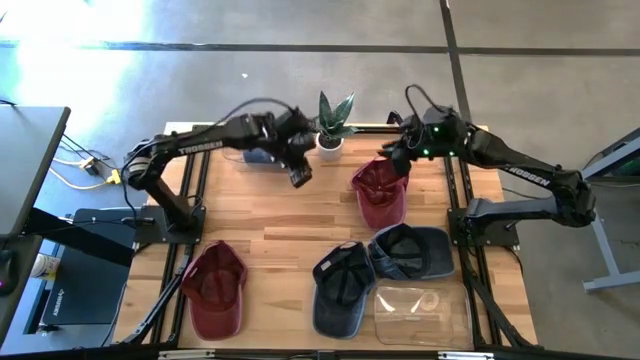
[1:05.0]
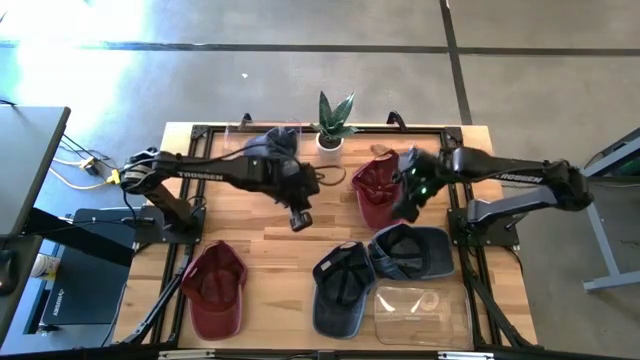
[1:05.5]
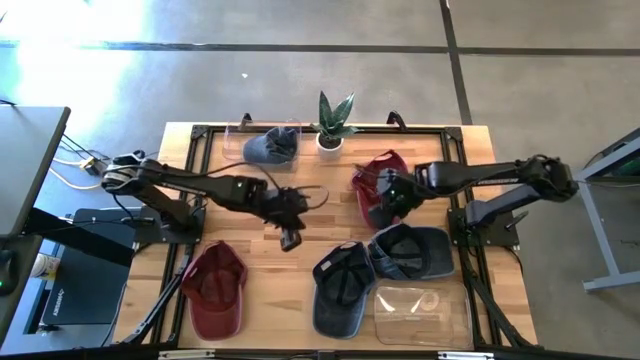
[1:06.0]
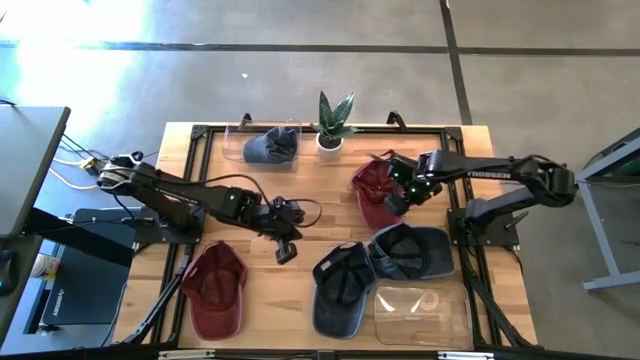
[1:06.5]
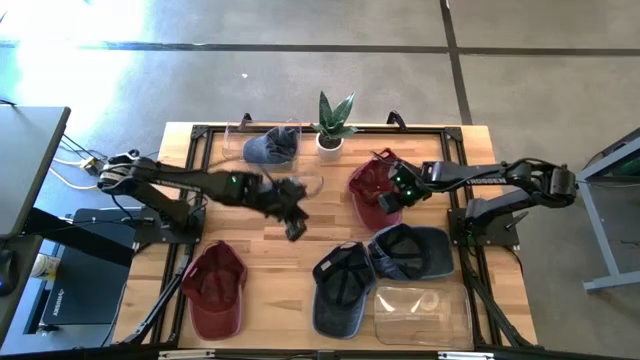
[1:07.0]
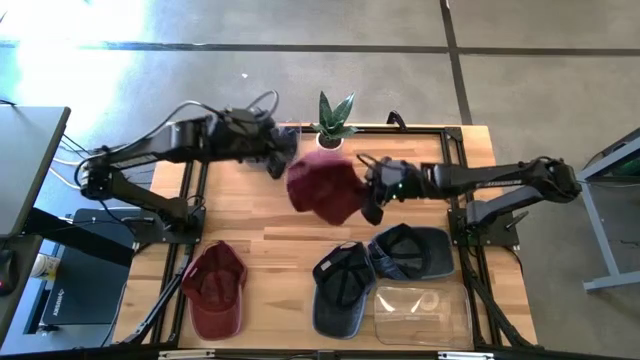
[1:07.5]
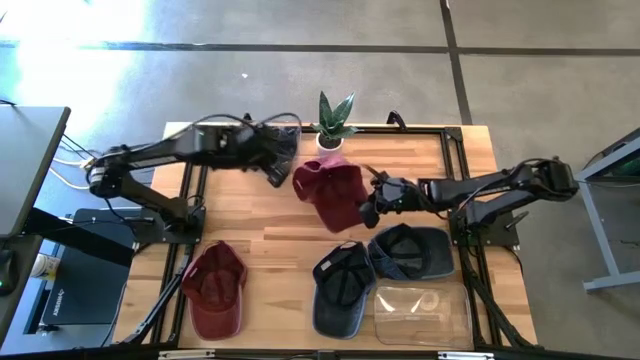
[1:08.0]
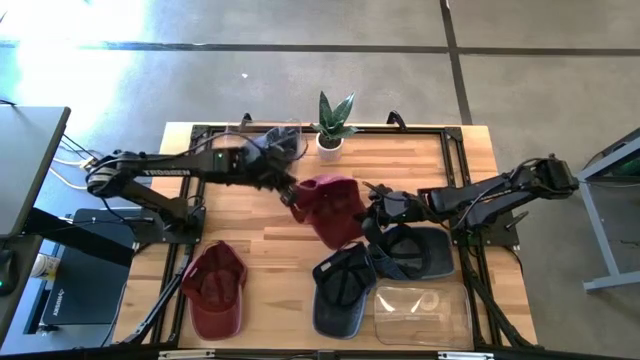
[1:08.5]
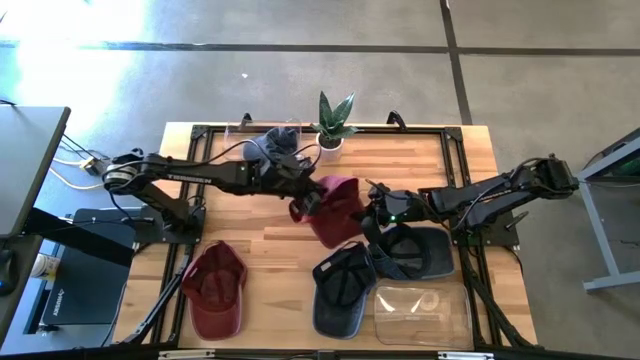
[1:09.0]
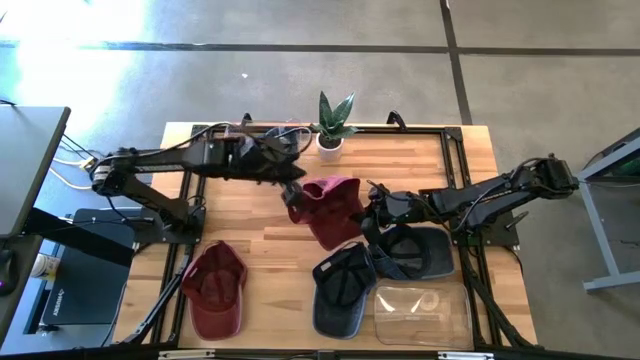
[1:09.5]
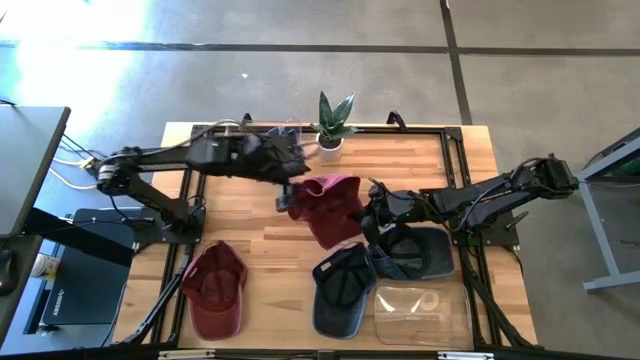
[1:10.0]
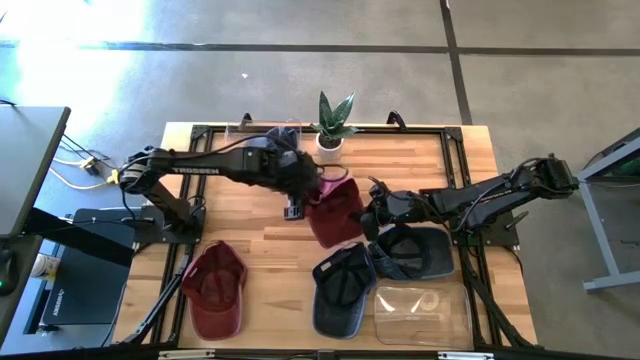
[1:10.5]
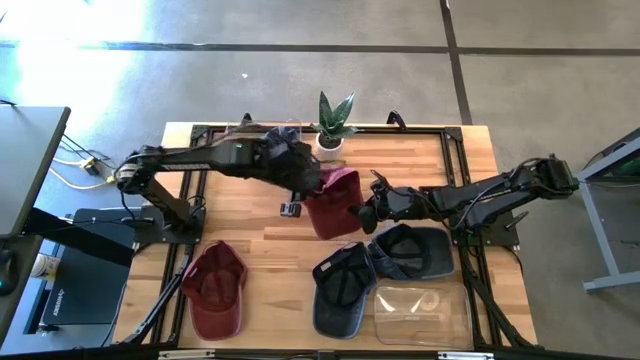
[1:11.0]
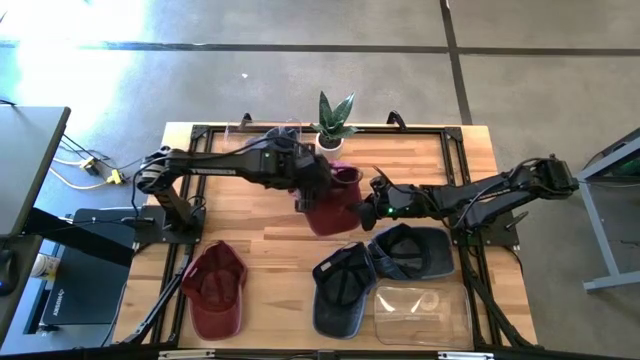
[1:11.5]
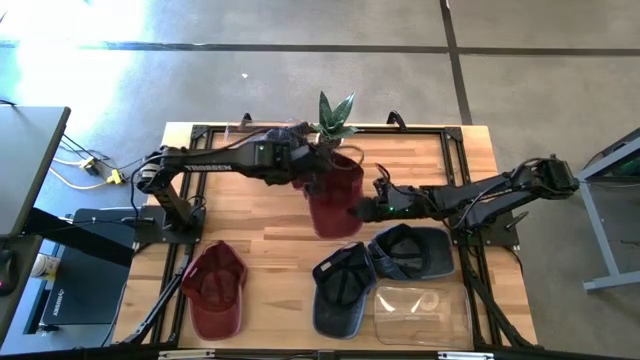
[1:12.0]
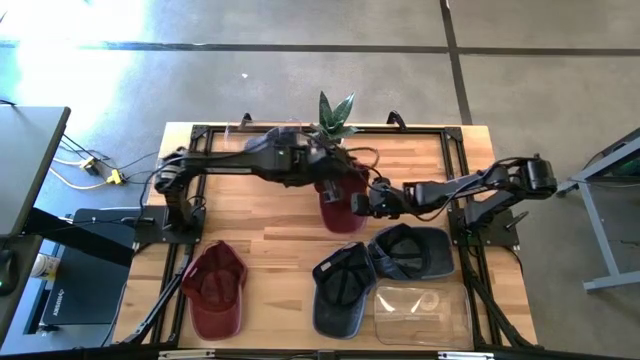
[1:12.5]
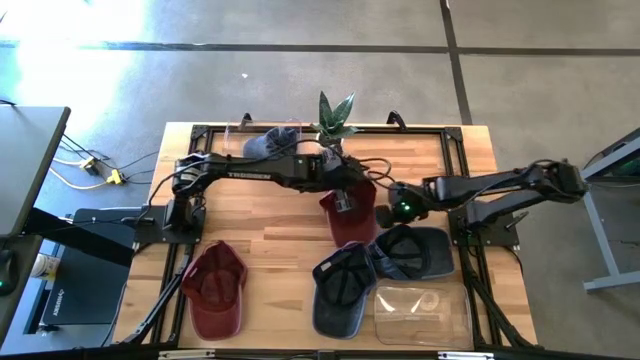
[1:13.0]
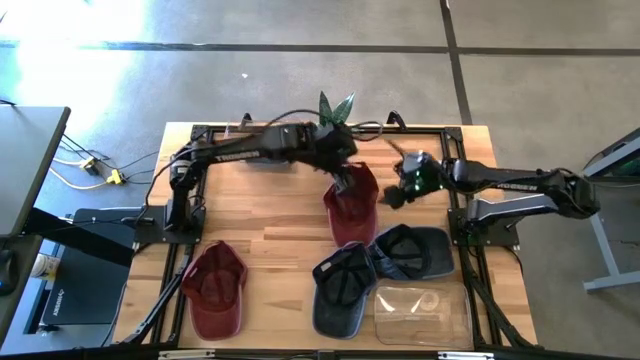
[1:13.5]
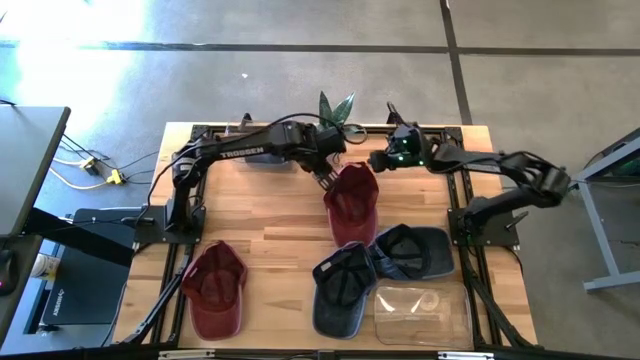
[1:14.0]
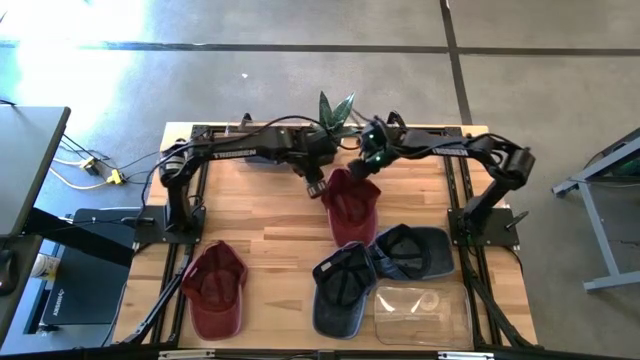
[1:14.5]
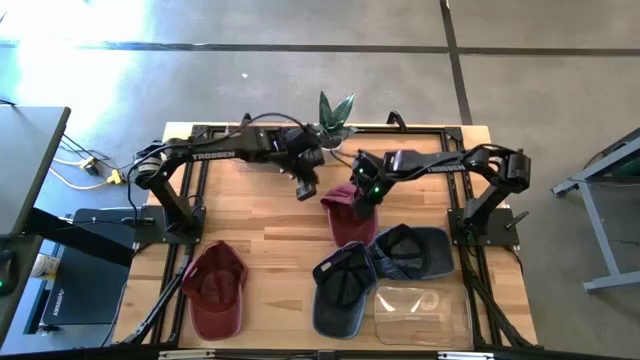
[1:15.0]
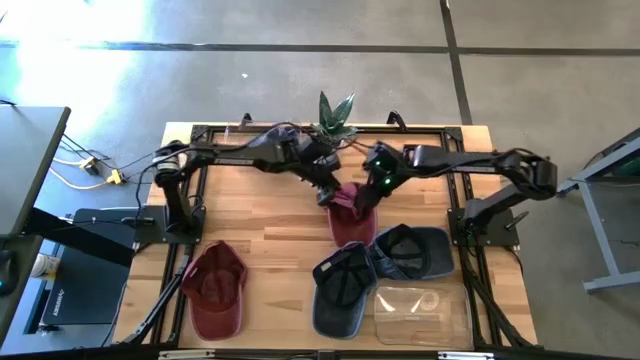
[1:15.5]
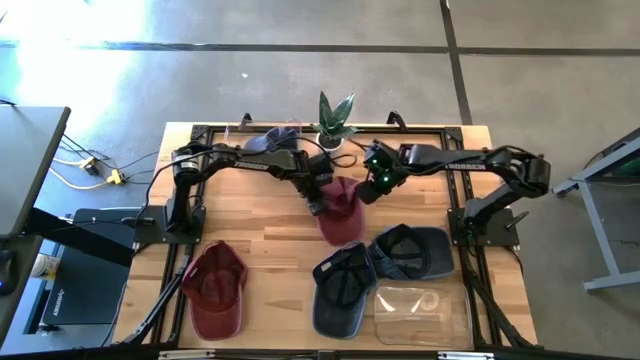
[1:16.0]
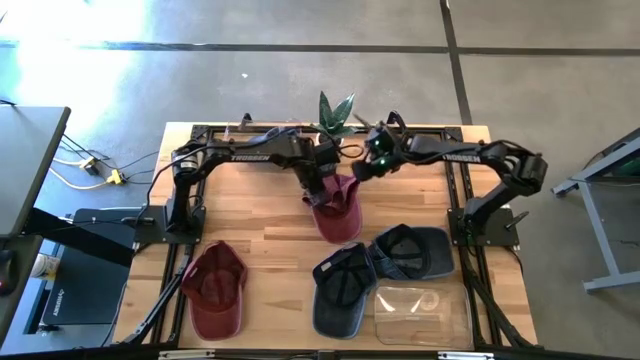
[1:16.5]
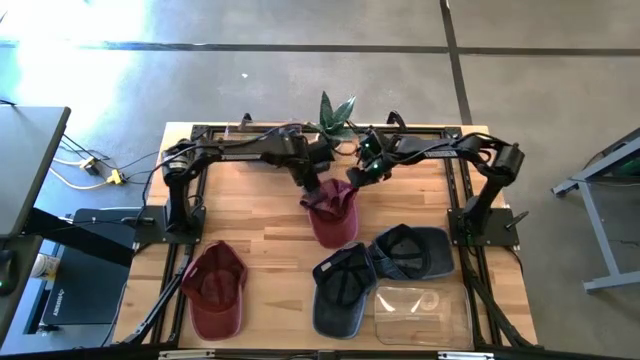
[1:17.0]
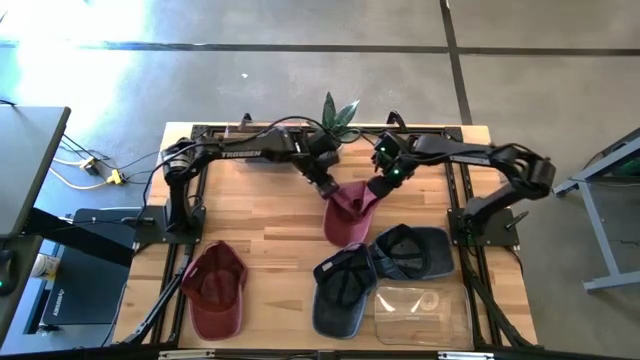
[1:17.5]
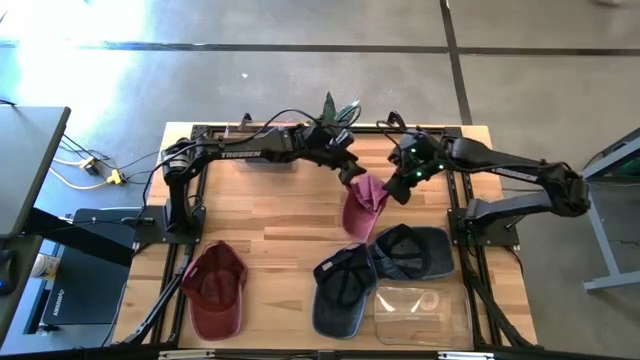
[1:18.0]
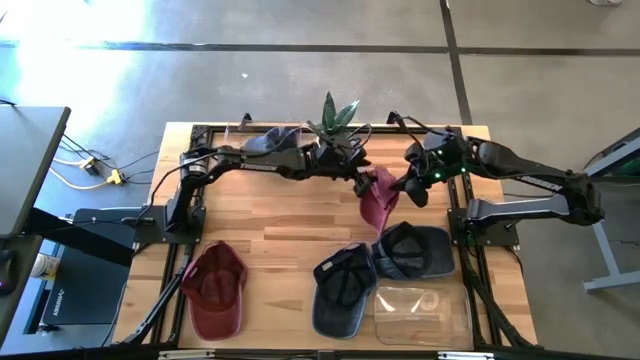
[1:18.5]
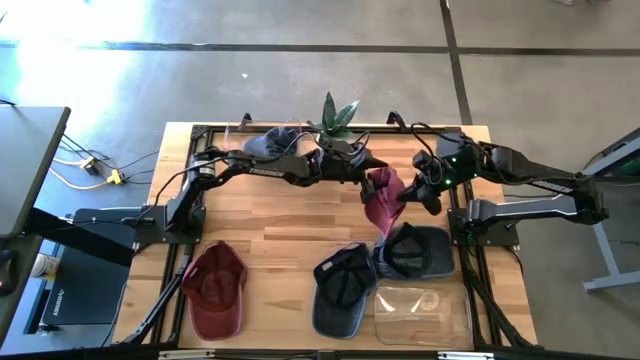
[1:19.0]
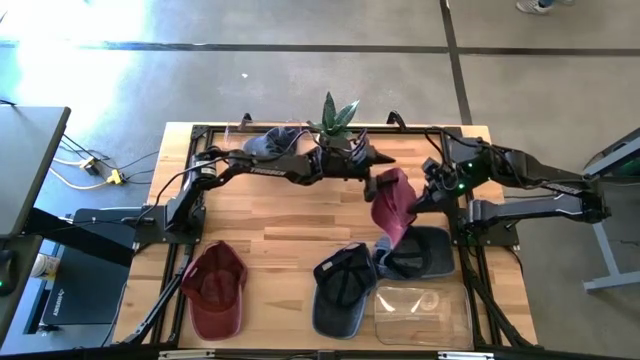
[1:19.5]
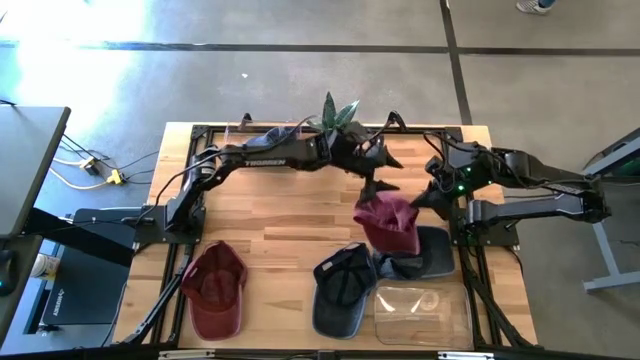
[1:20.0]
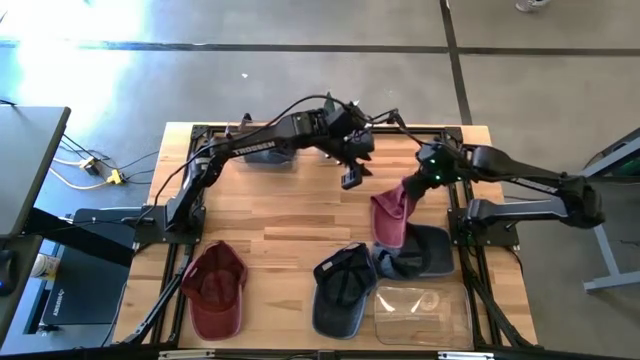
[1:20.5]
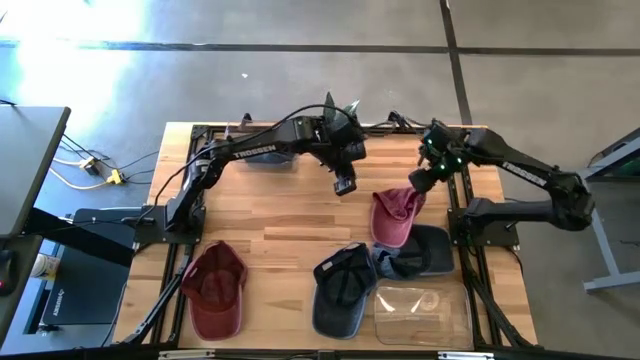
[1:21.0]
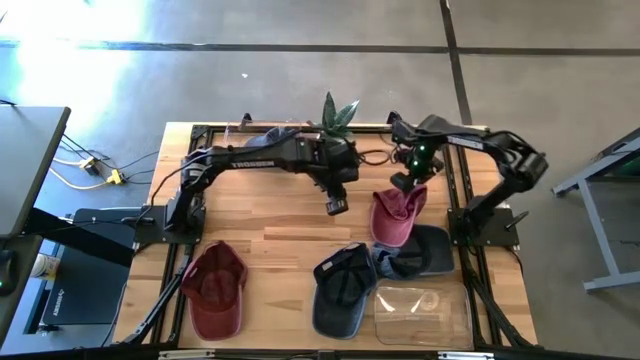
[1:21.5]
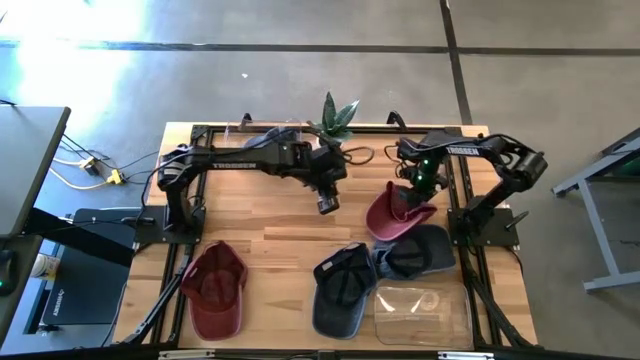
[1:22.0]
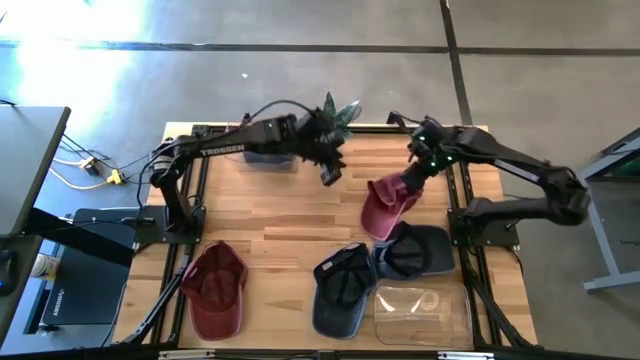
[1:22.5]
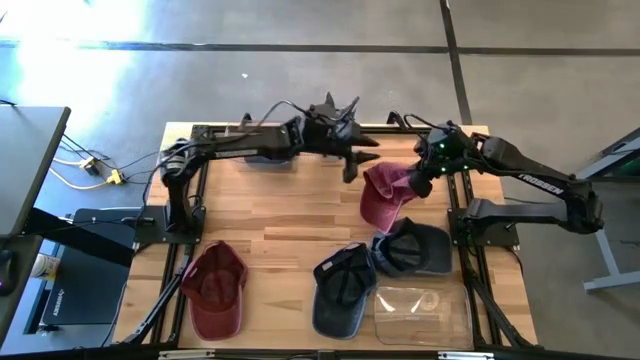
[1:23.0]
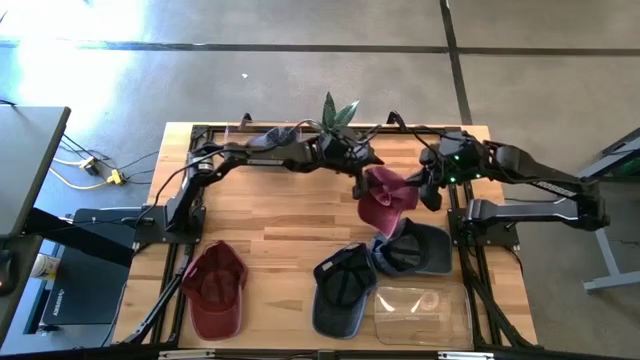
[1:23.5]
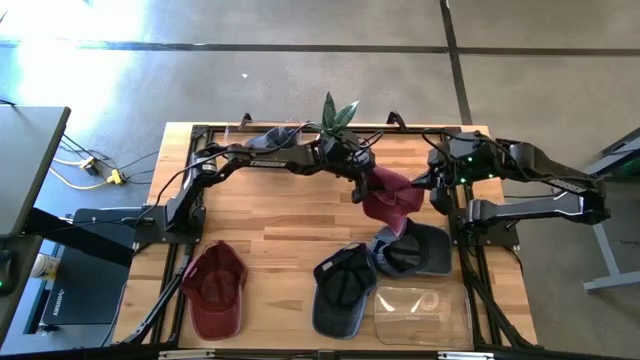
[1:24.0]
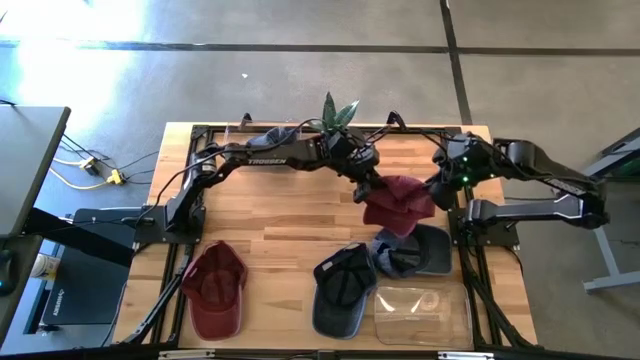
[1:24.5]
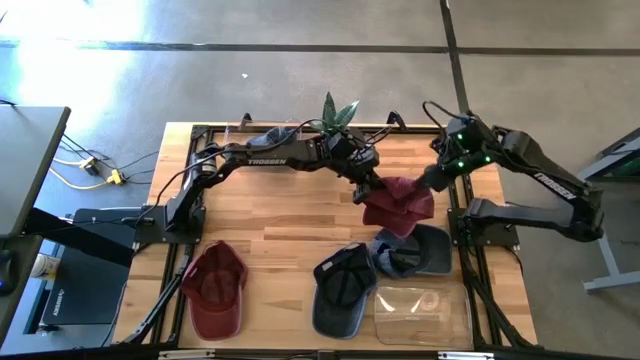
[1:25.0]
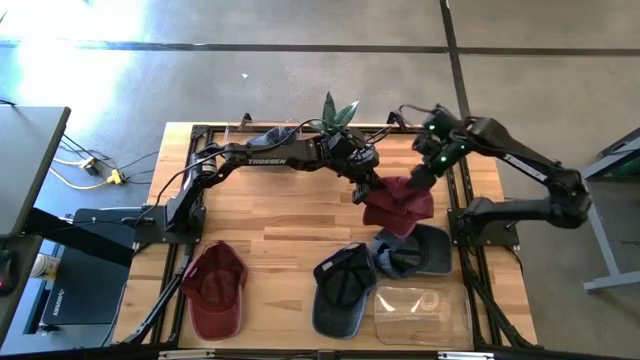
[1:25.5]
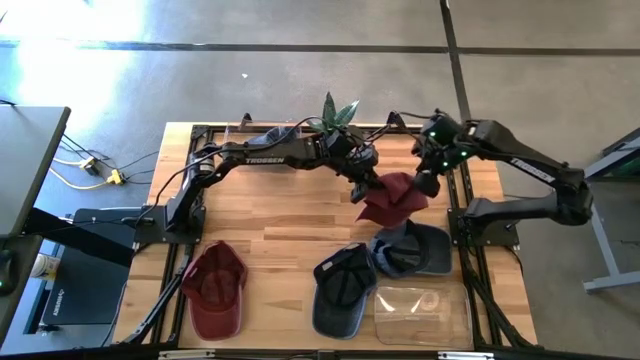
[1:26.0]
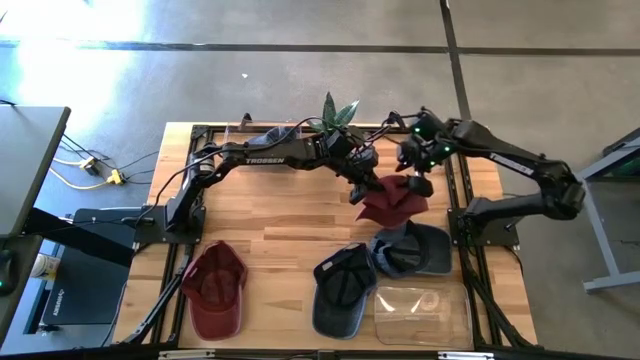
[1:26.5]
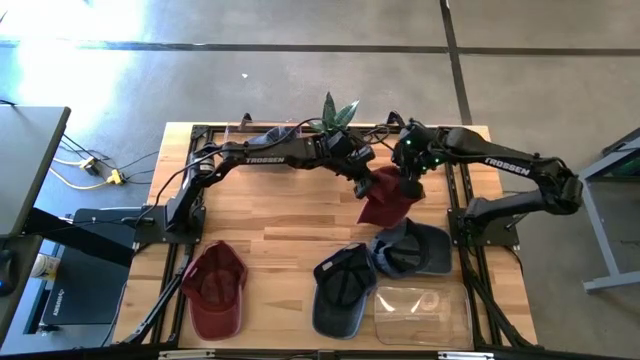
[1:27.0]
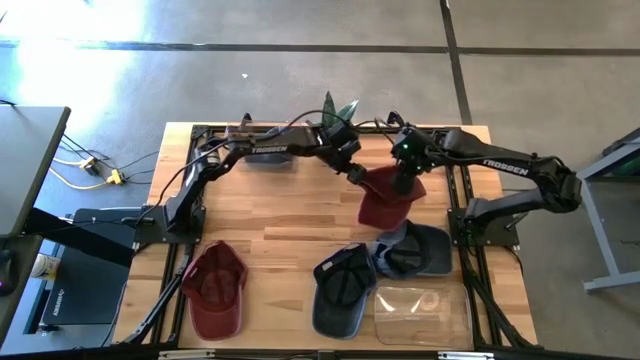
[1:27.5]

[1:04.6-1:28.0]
Task: Pick & Place hat
Put the top red cap into the bottom transparent bin
